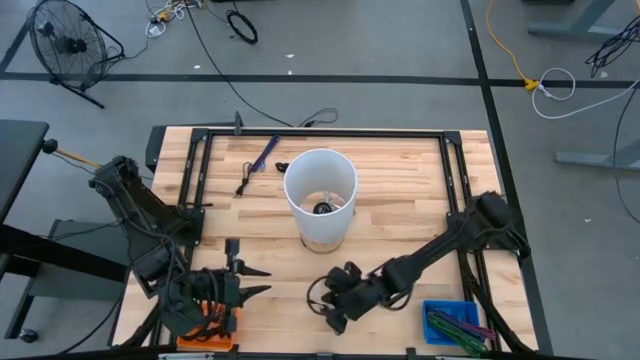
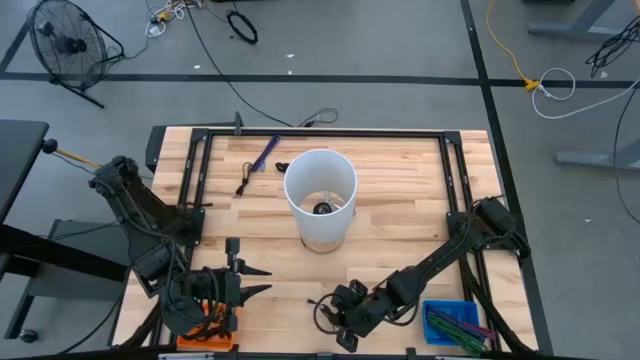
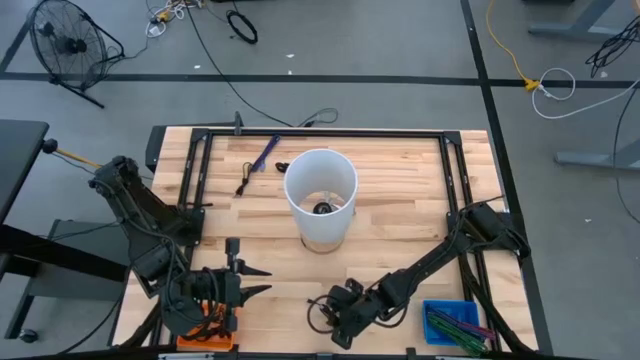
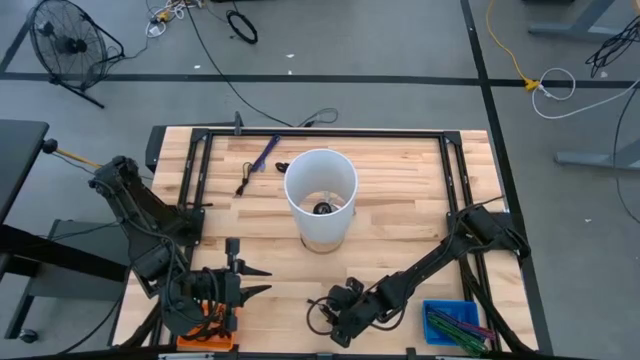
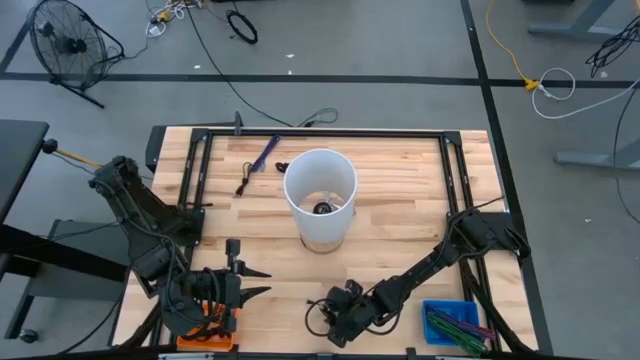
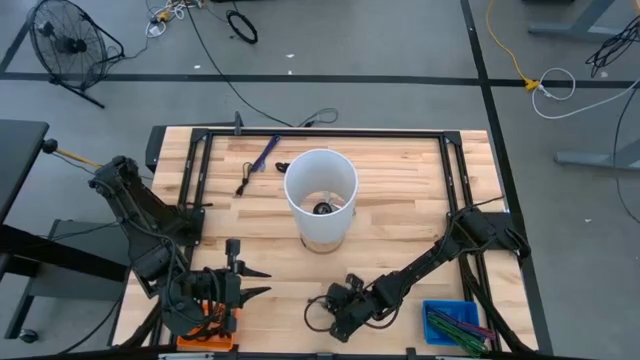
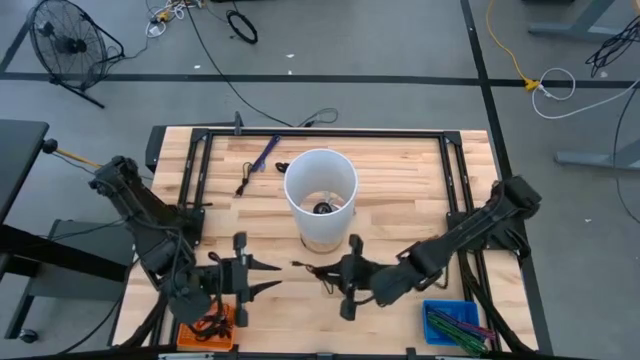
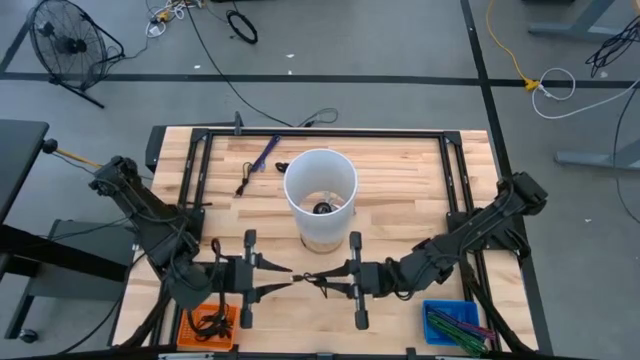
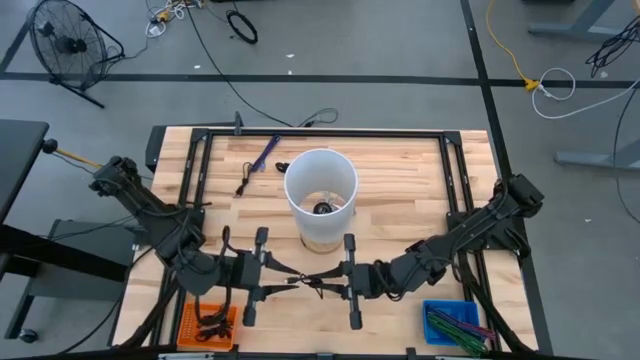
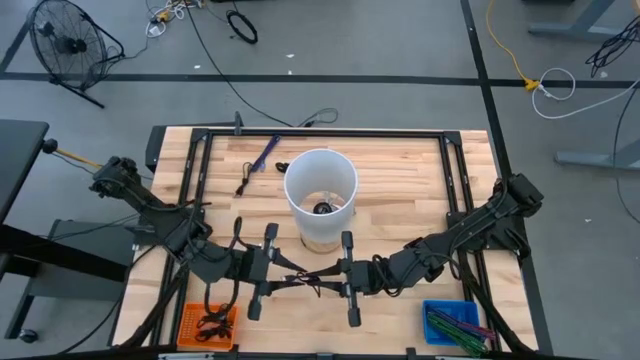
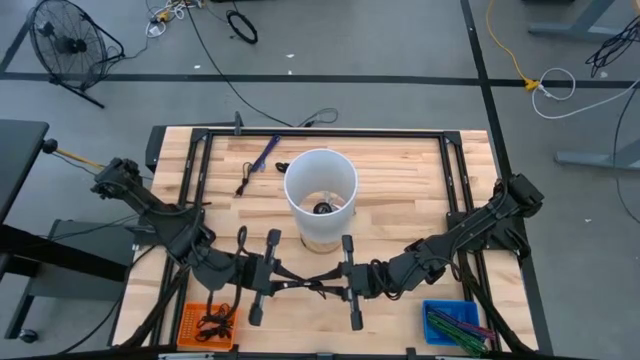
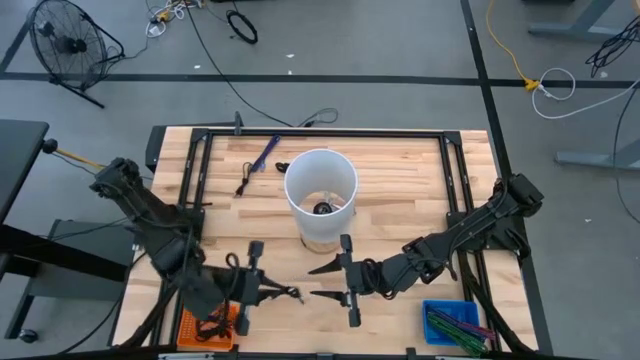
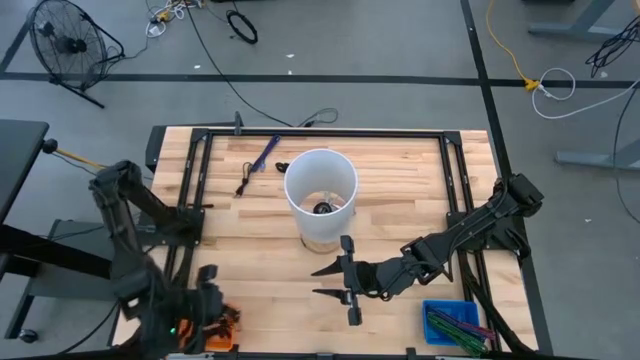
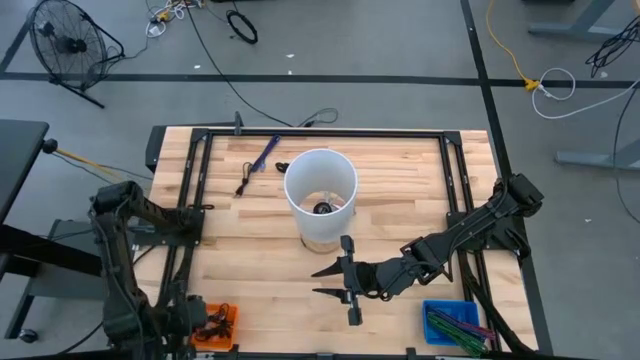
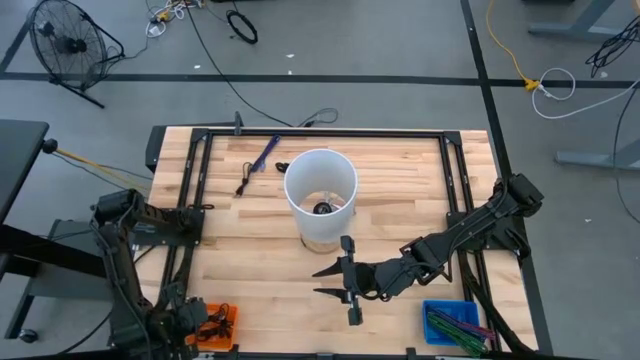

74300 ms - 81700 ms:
Task: Pick & Place USB Port
Put the black charger cable into the orange bin

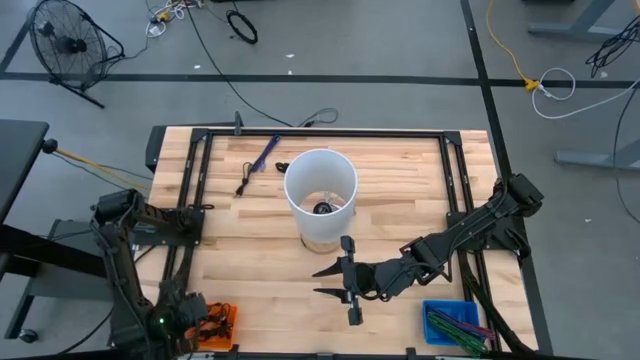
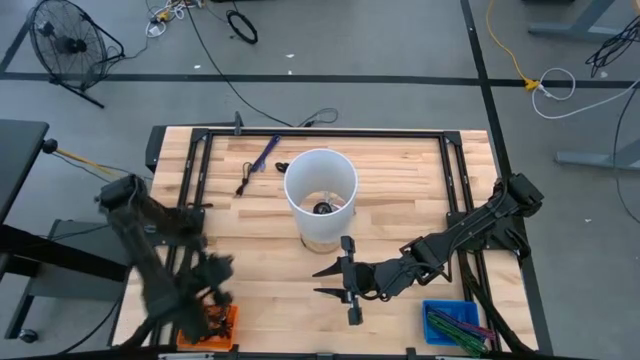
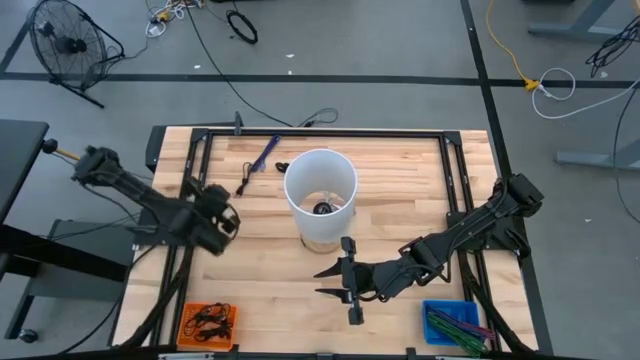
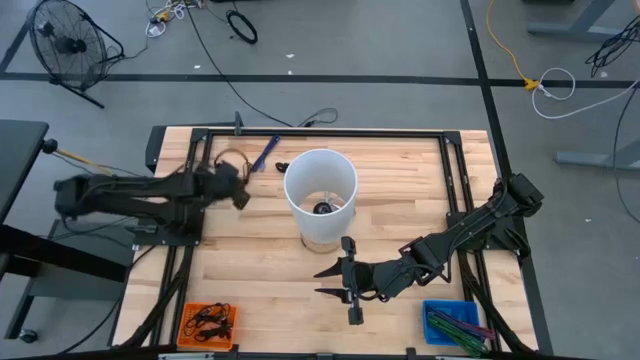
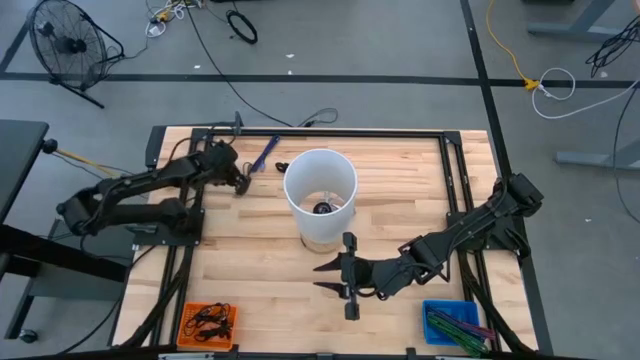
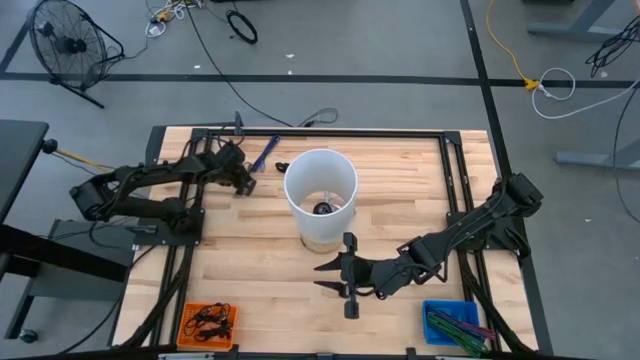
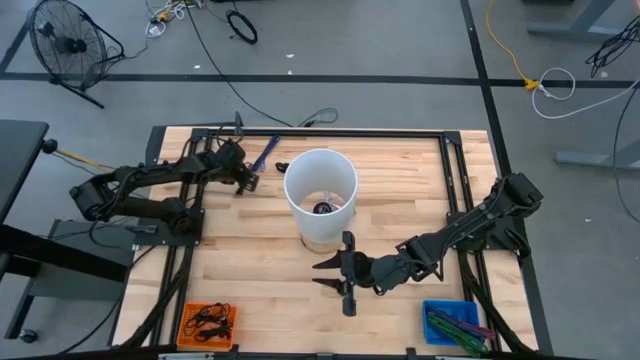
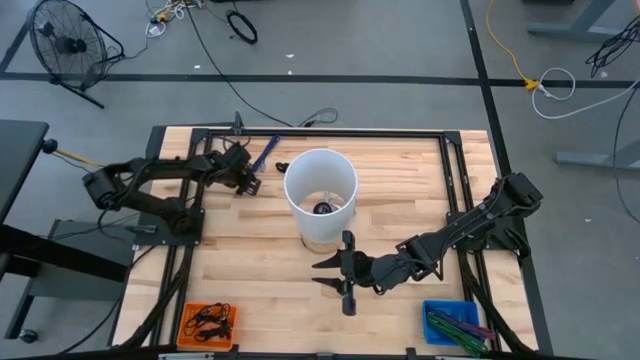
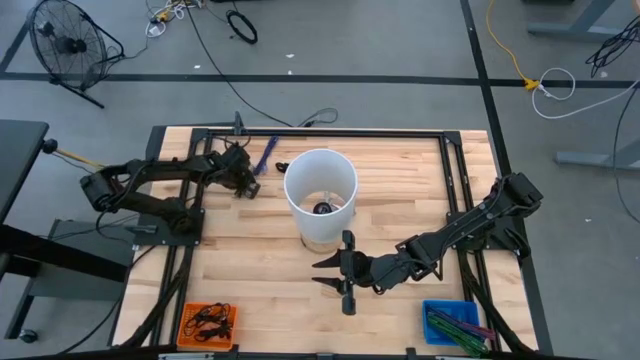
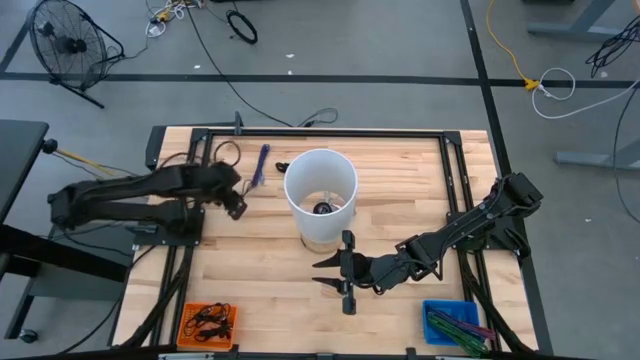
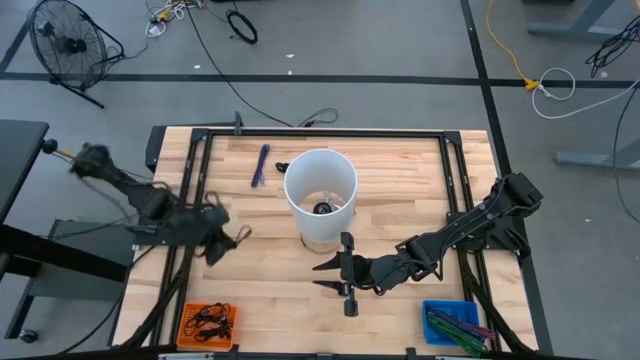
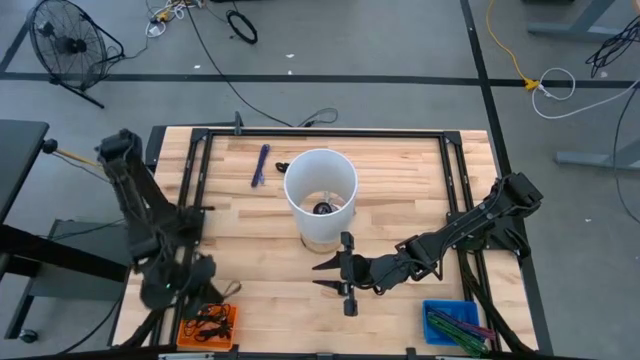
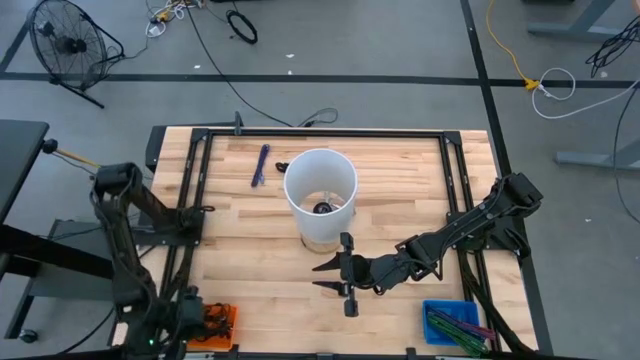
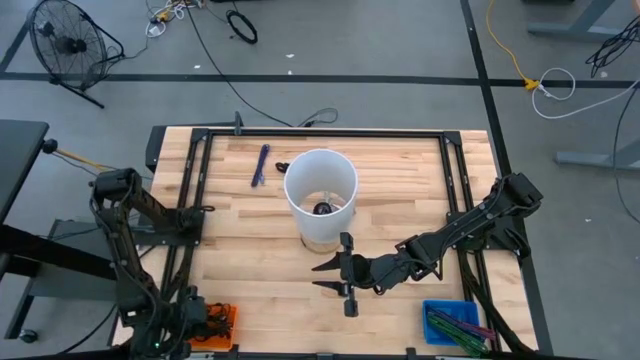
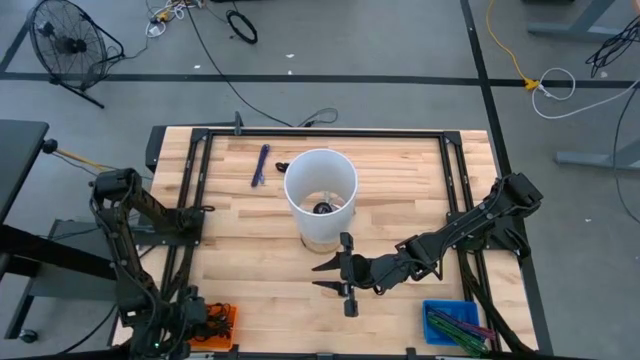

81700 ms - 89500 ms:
Put the black charger cable into the orange bin

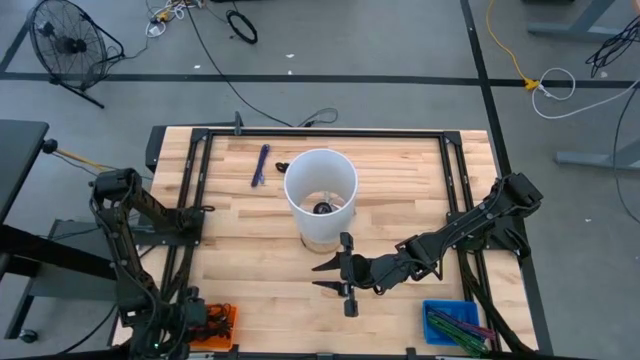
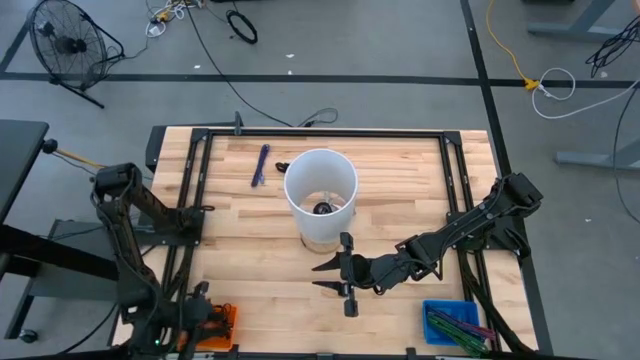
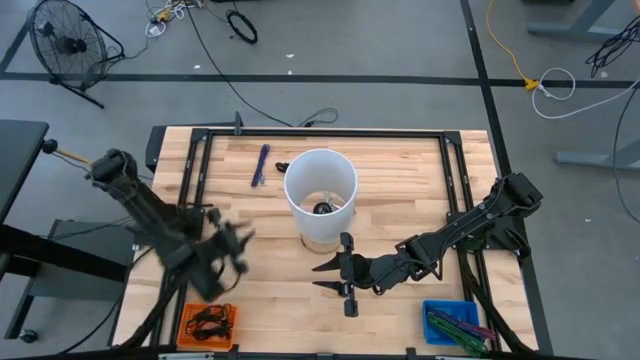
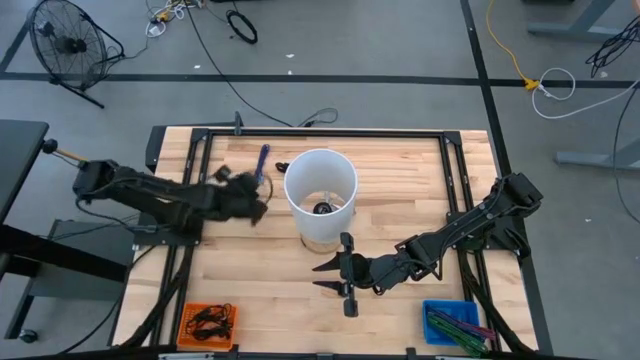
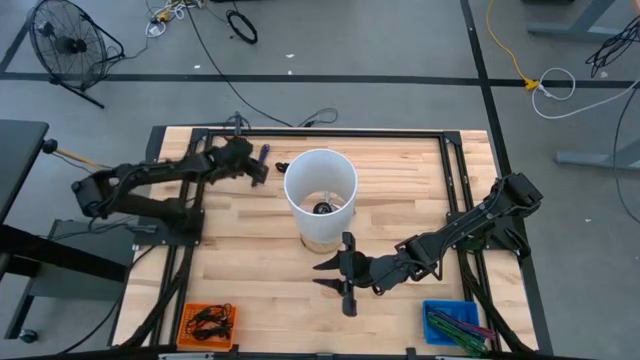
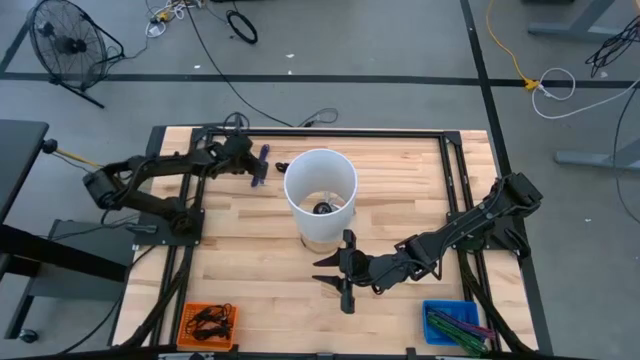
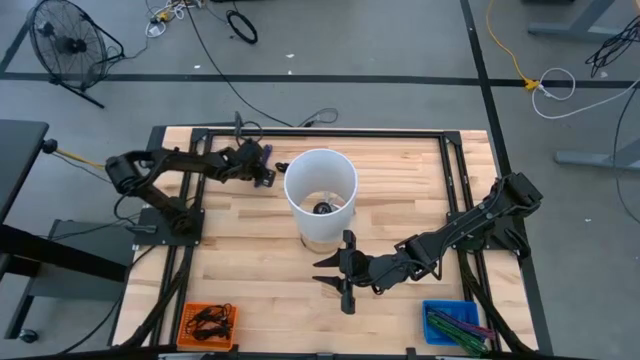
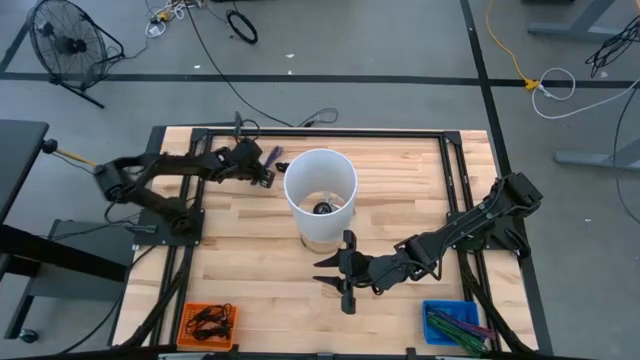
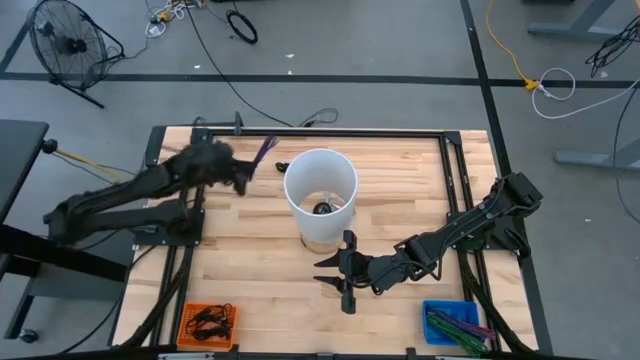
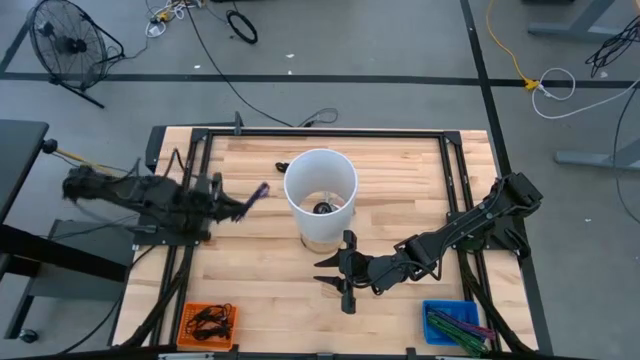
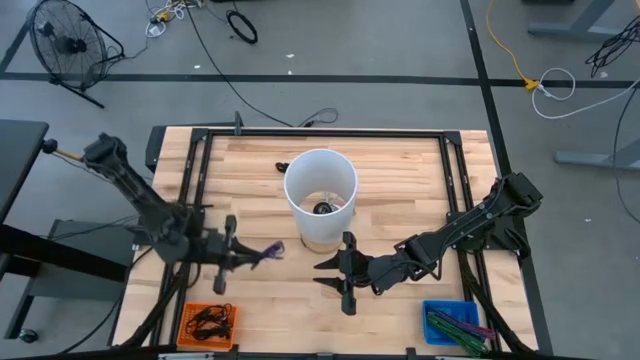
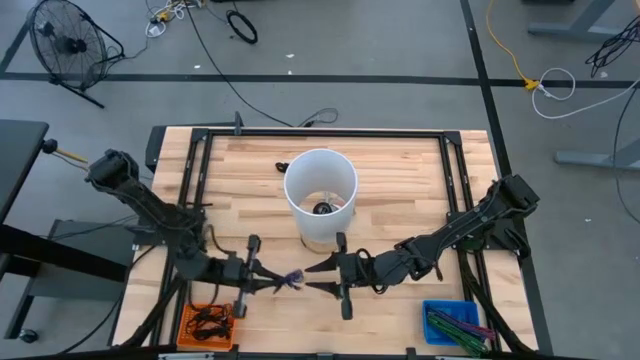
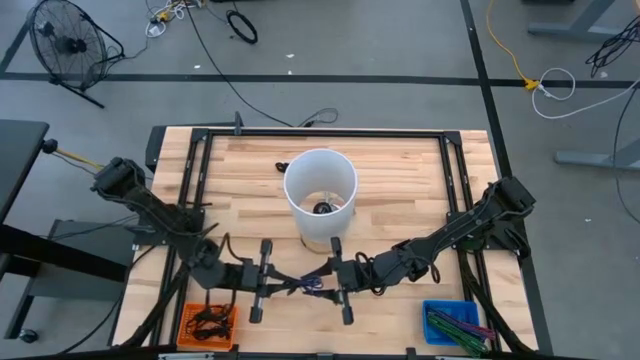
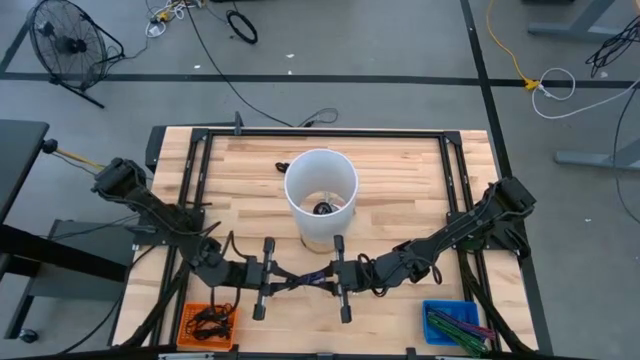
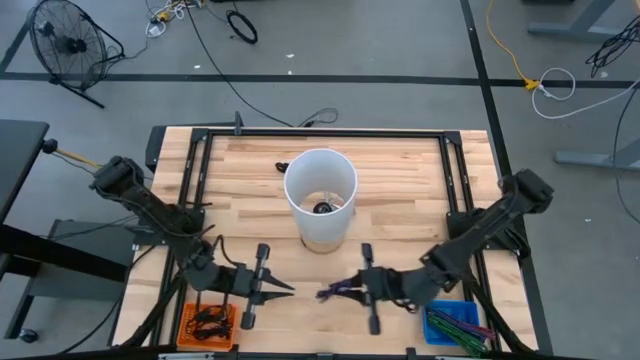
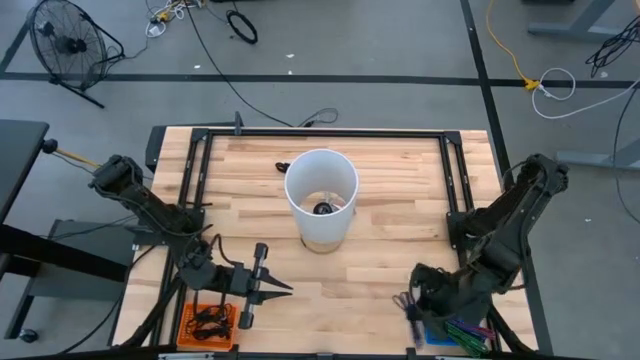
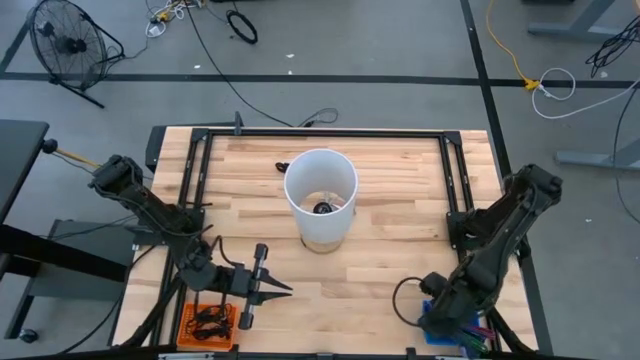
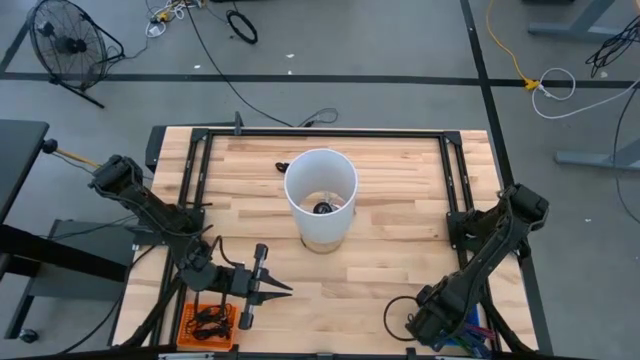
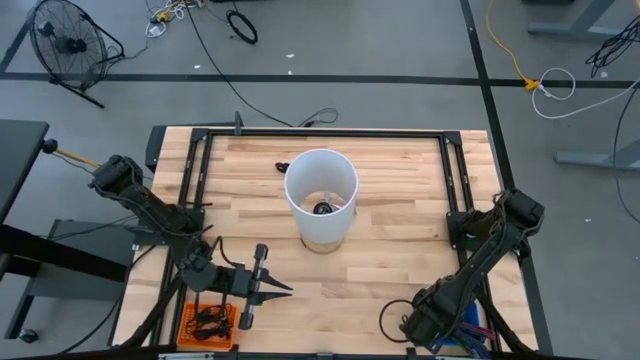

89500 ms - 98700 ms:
Put the black and violet charger cable into the blue bin
